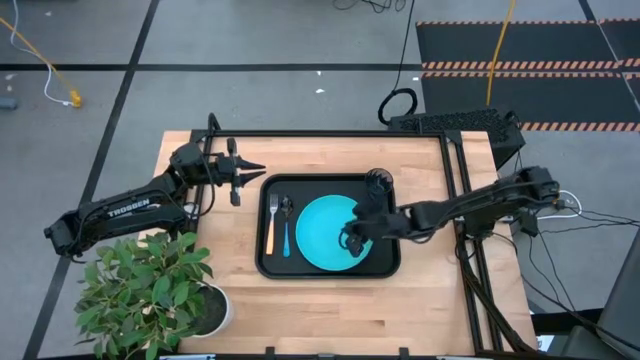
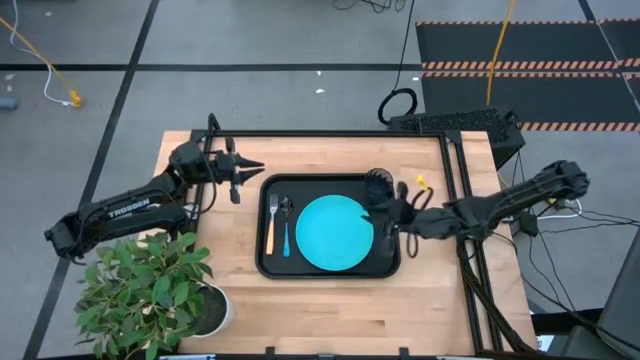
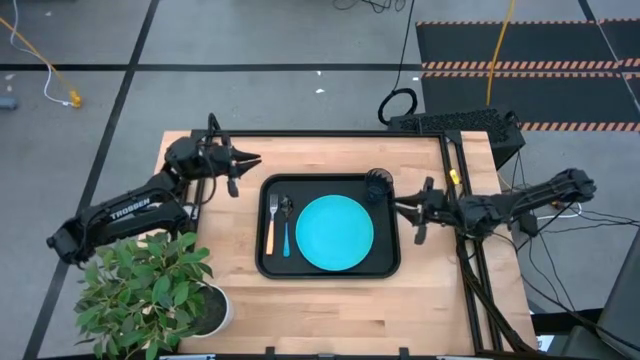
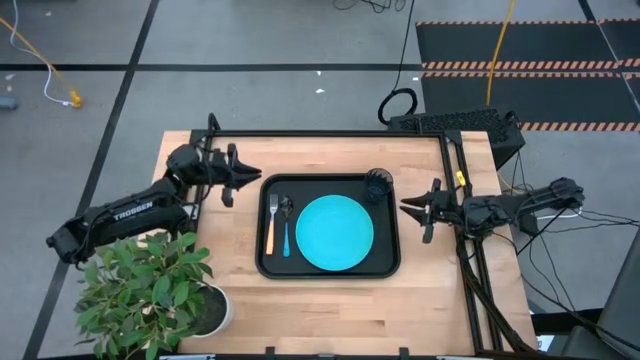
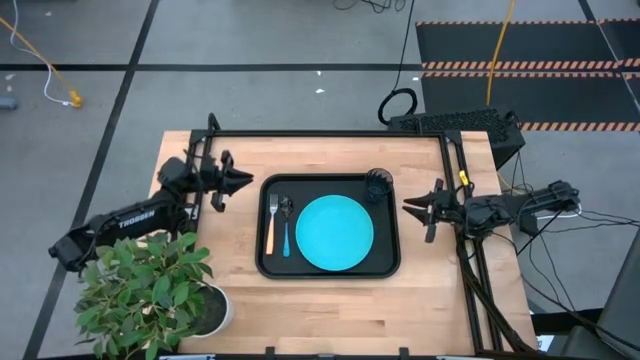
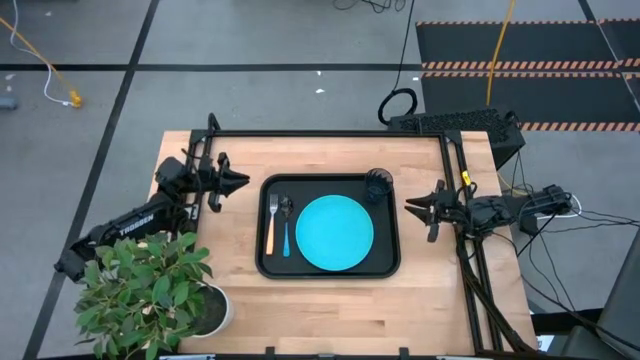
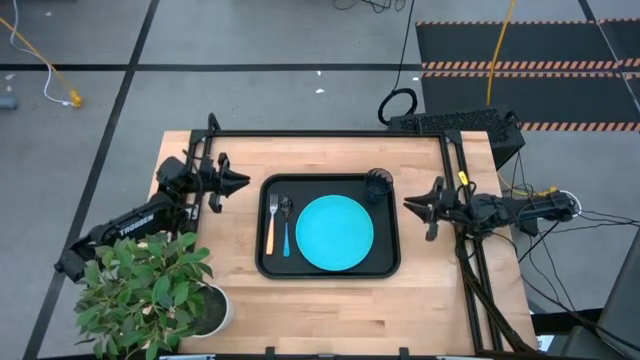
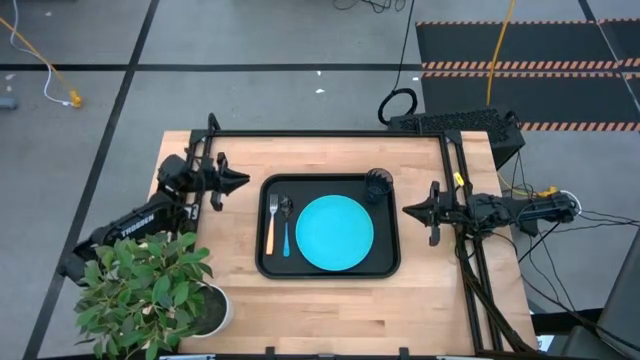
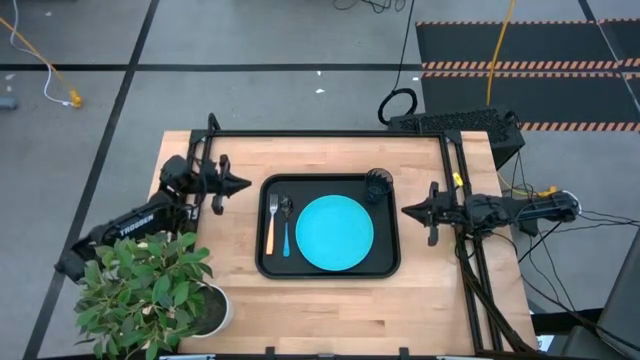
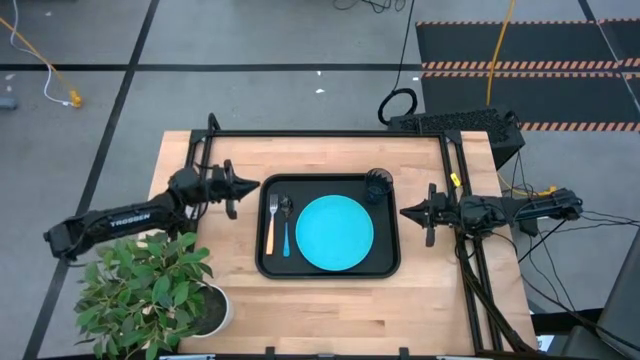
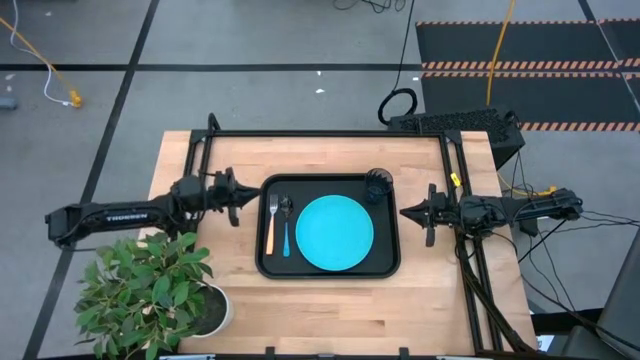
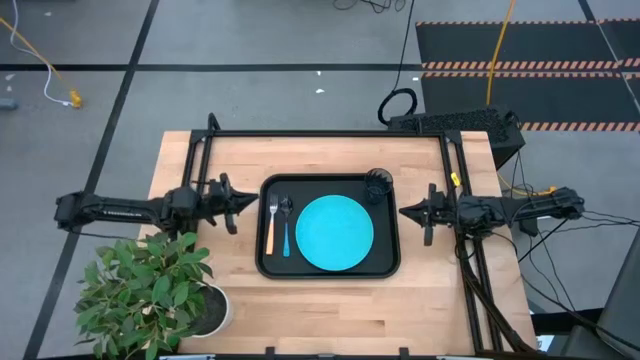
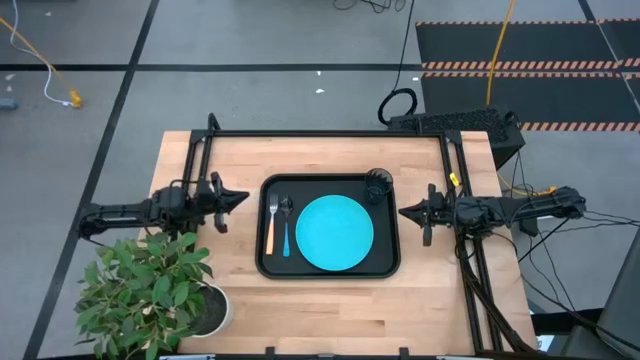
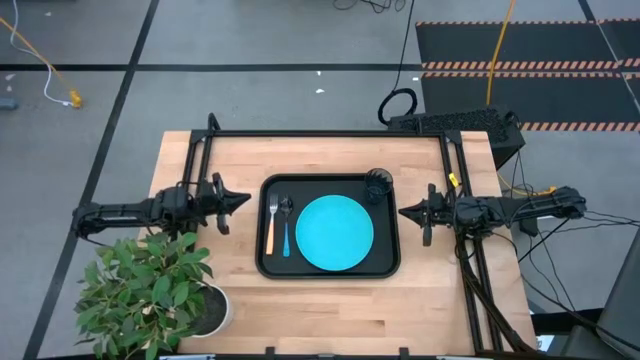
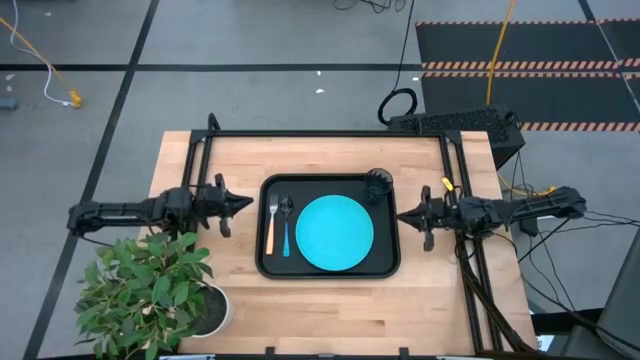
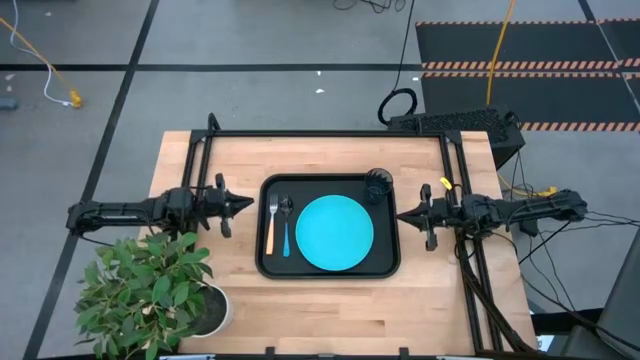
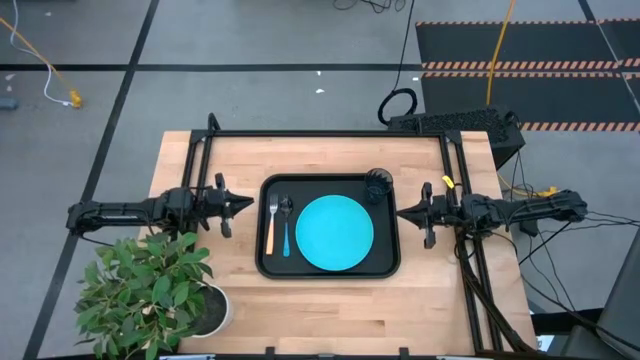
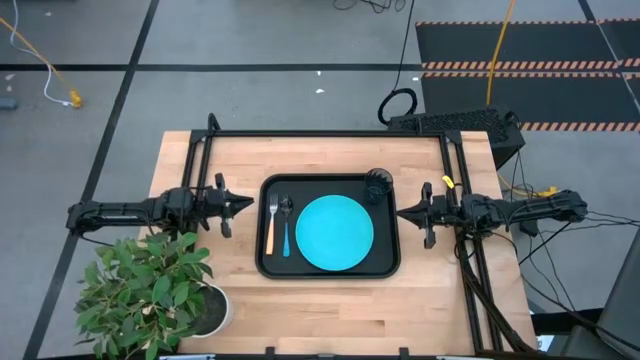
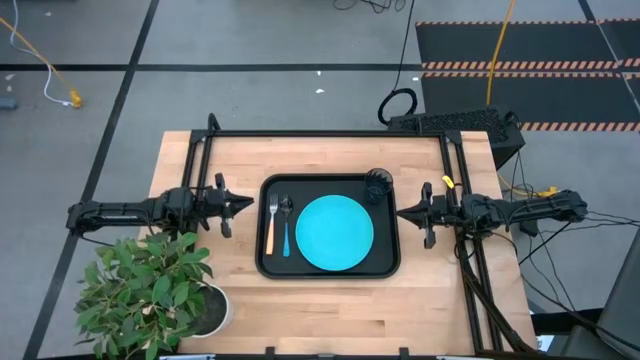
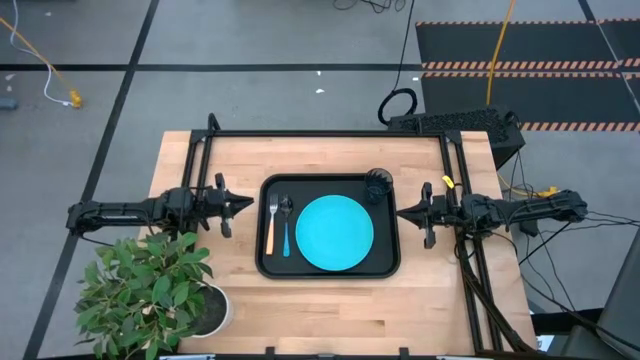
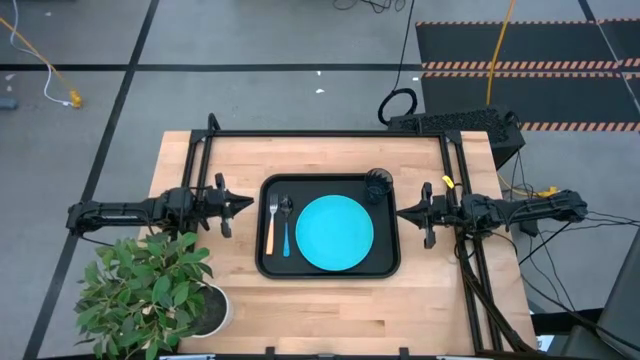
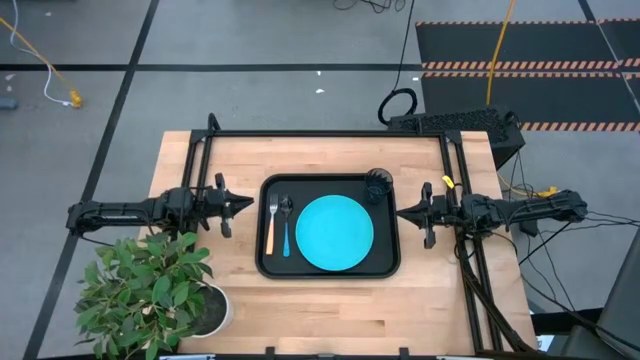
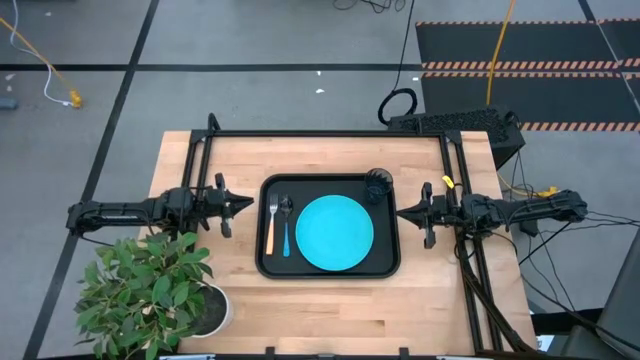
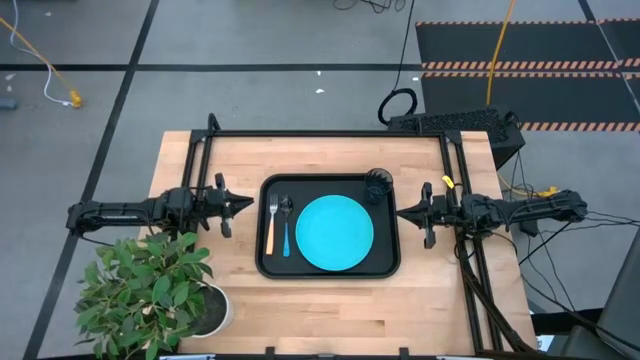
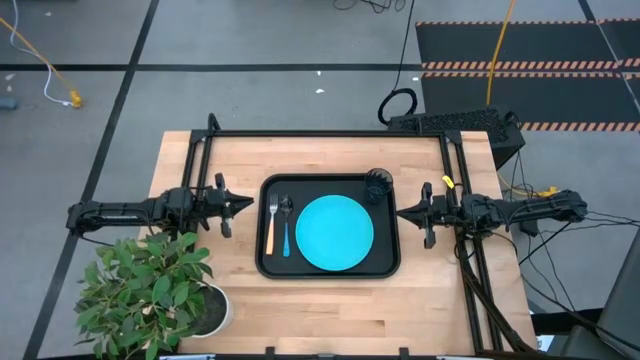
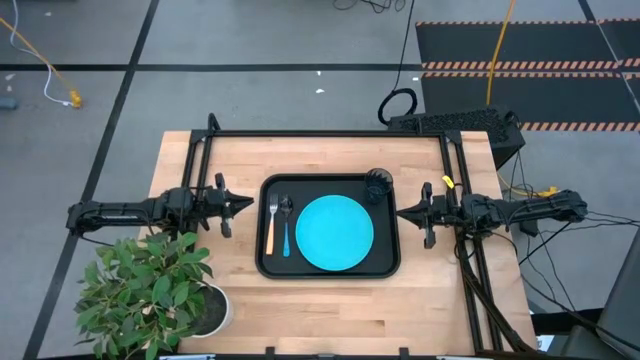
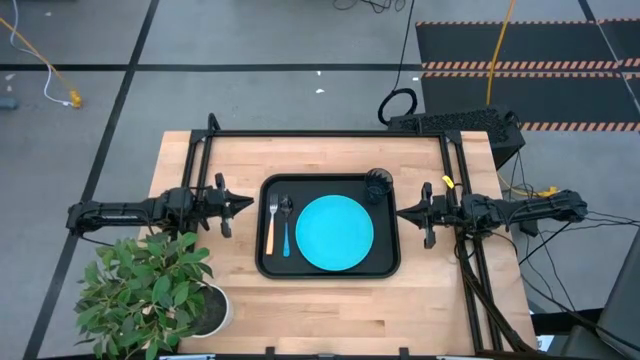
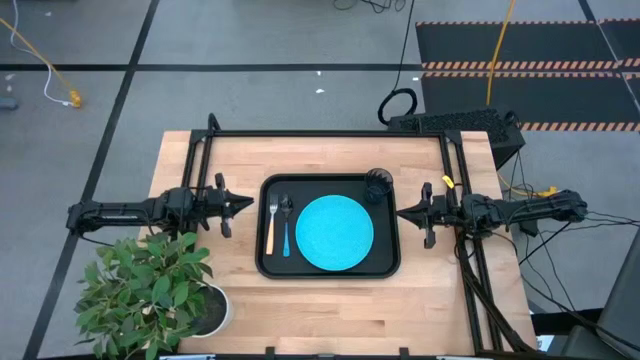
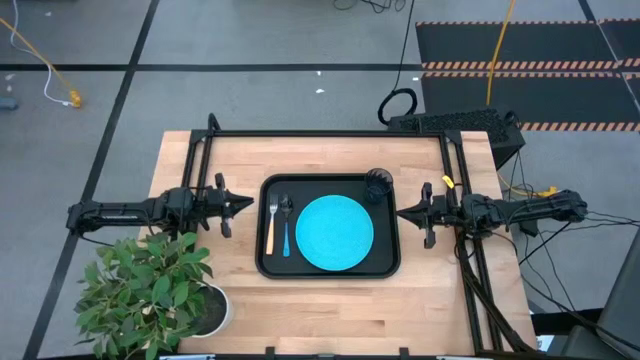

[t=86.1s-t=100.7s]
Task: Pick and place plate/cup/fork/spoon on tray
Return to Home Position

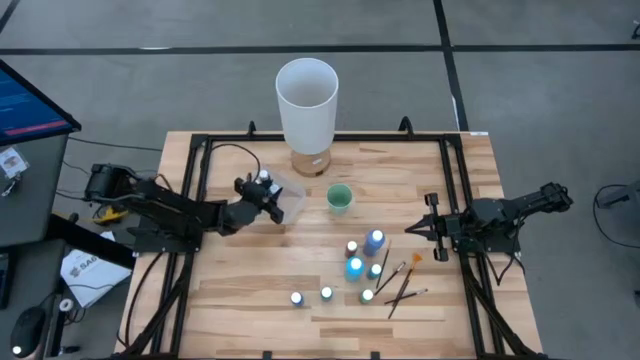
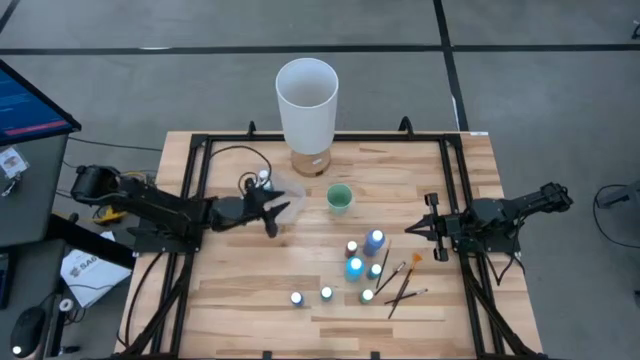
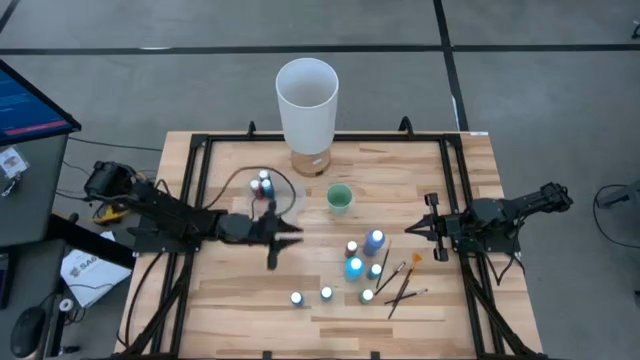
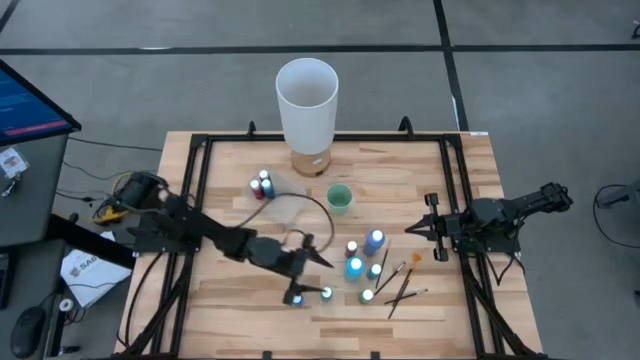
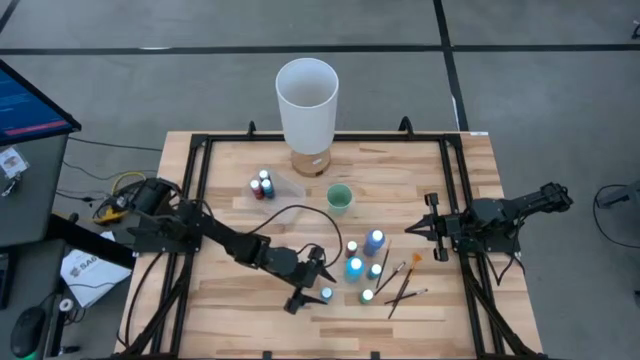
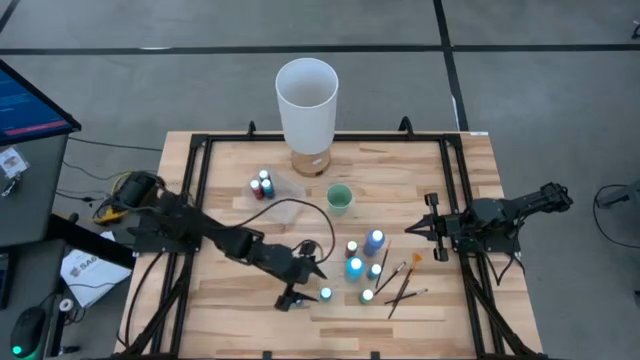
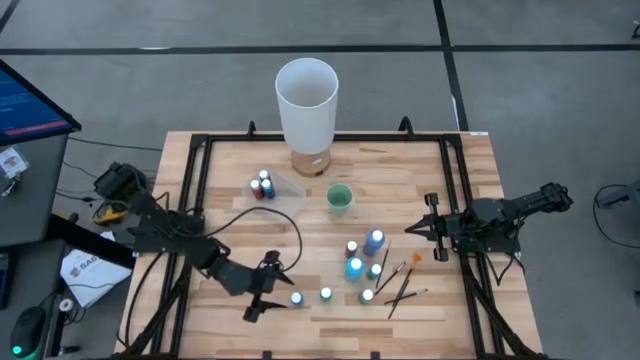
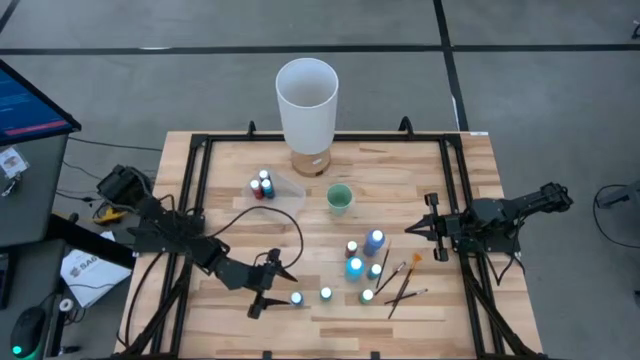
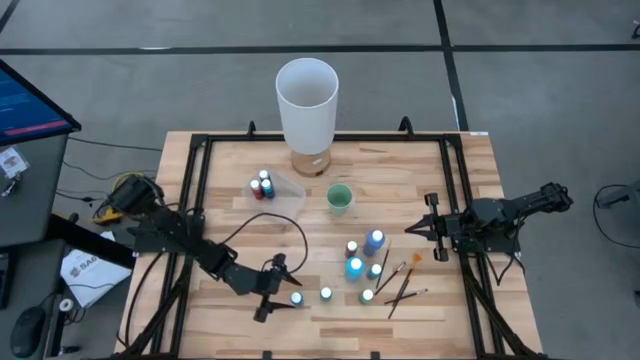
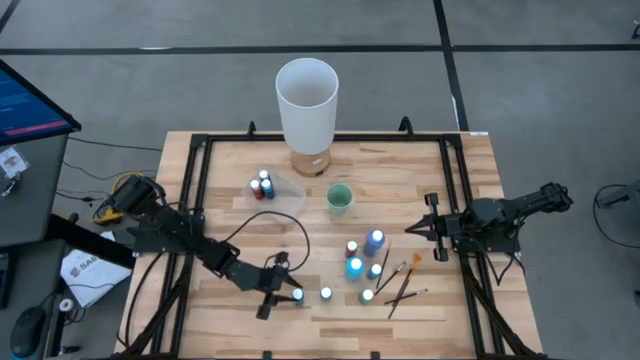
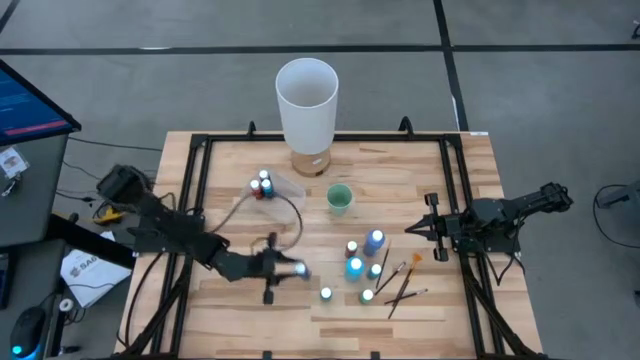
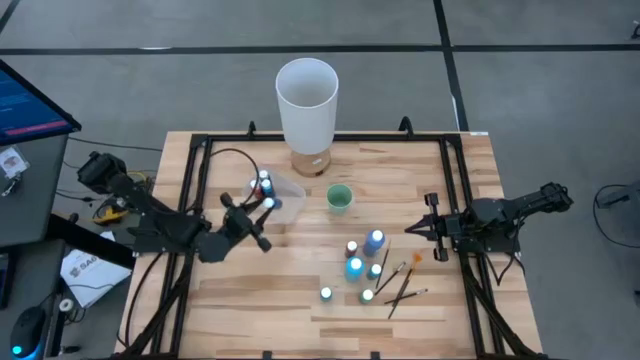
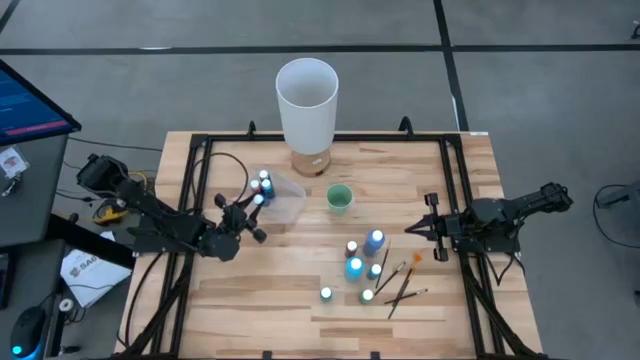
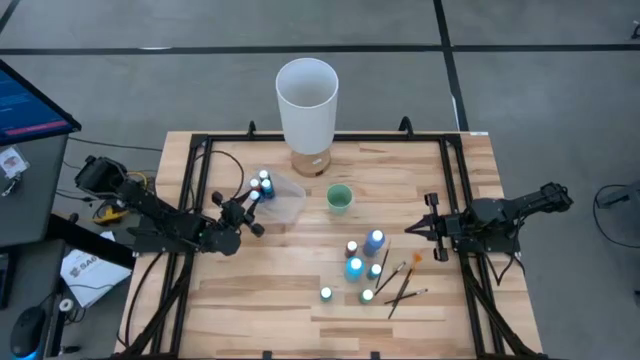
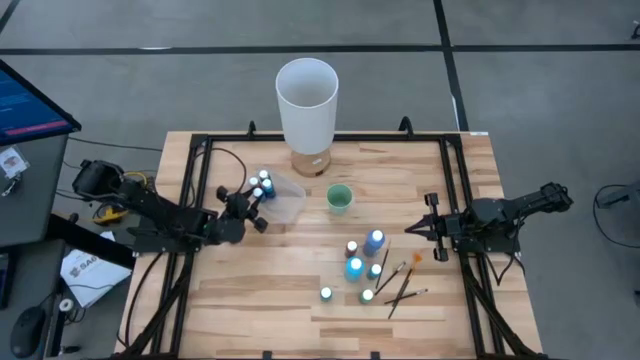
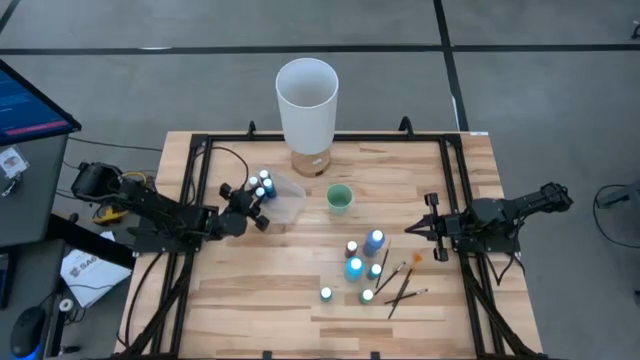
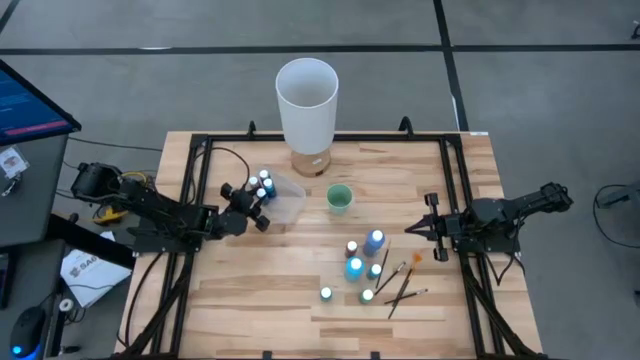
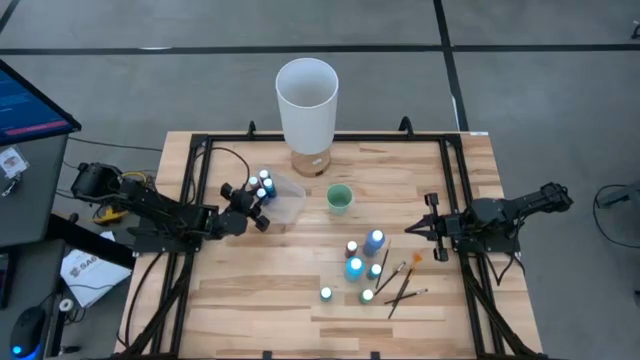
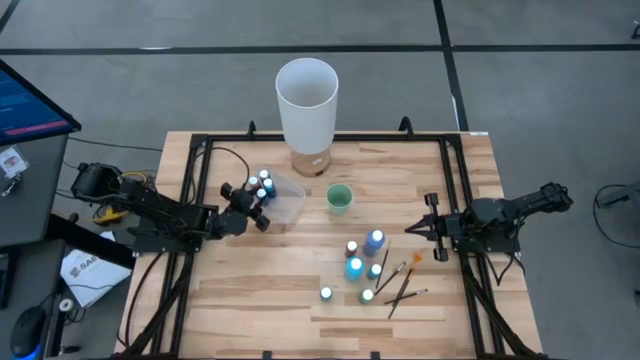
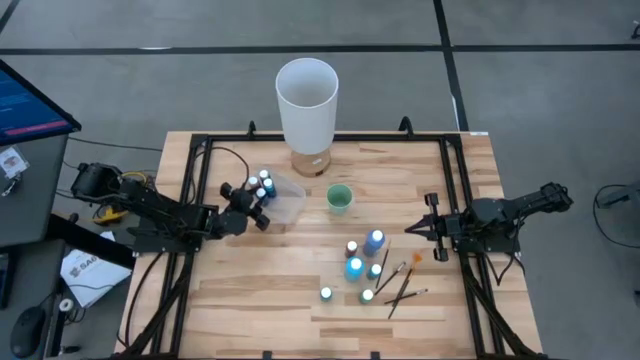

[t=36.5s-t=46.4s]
Task: Pick & Place Paint Supplies
Put the blue paint bottle into the transparent bin
